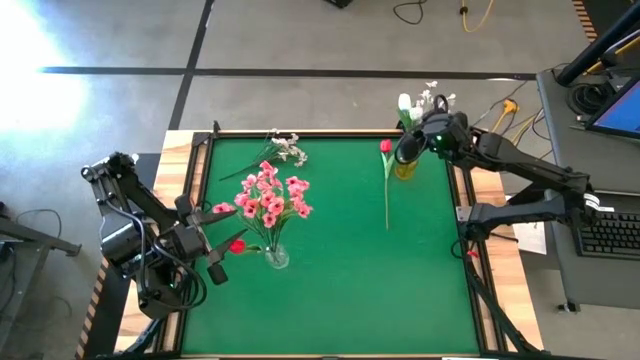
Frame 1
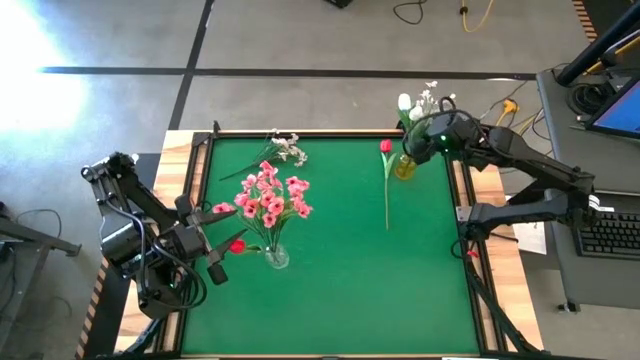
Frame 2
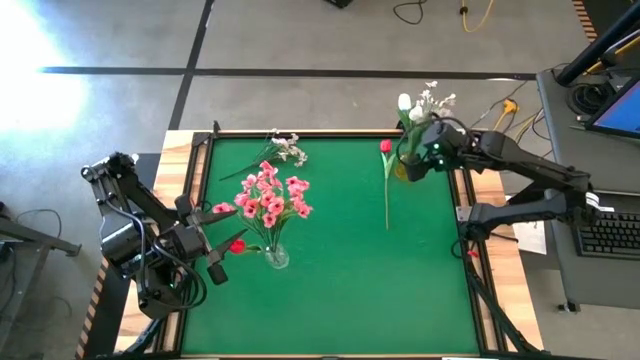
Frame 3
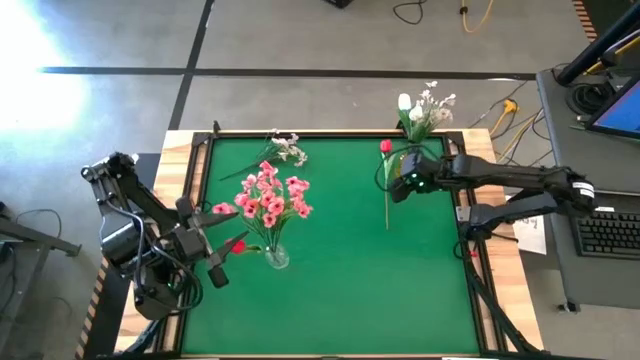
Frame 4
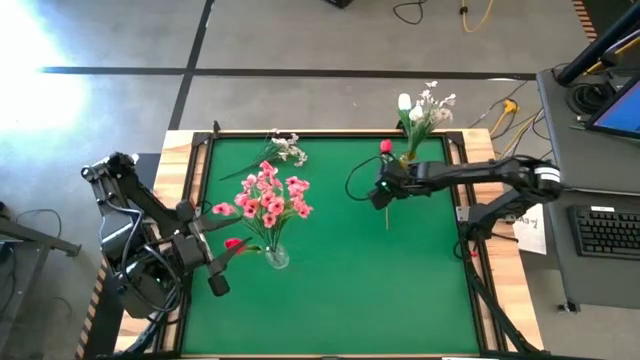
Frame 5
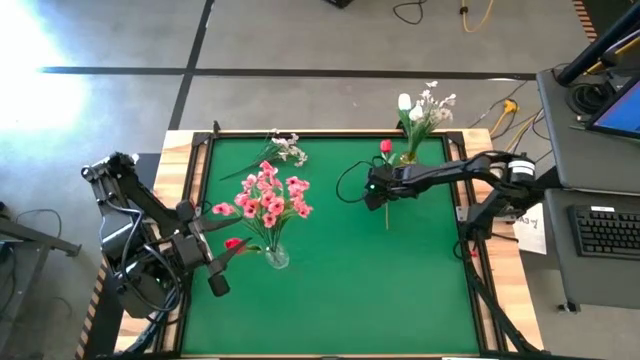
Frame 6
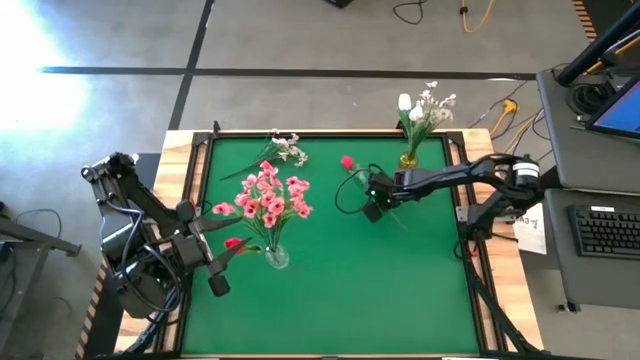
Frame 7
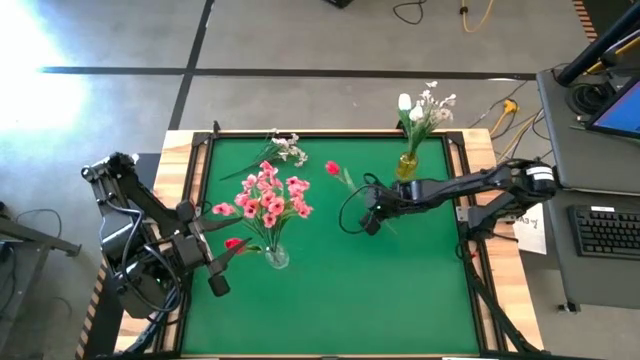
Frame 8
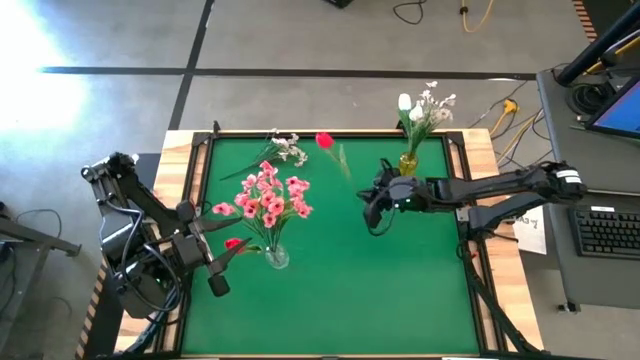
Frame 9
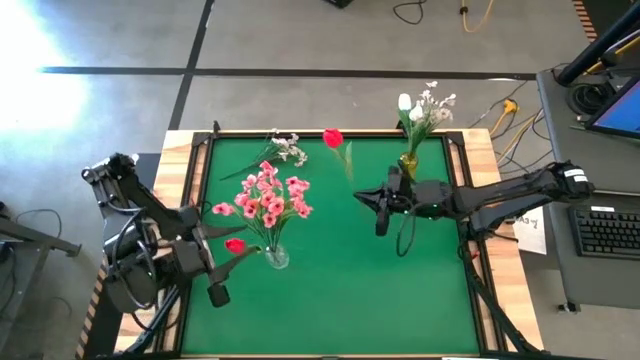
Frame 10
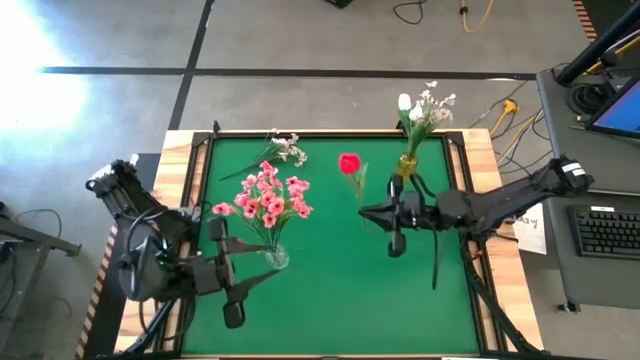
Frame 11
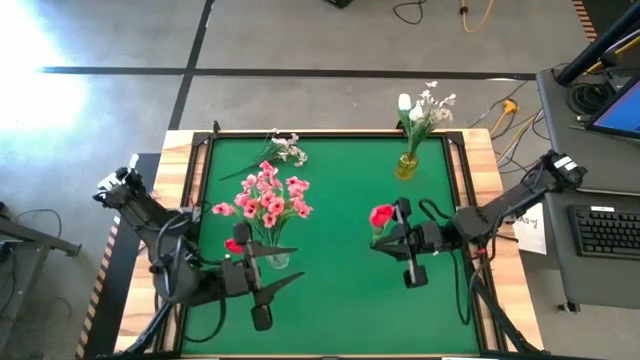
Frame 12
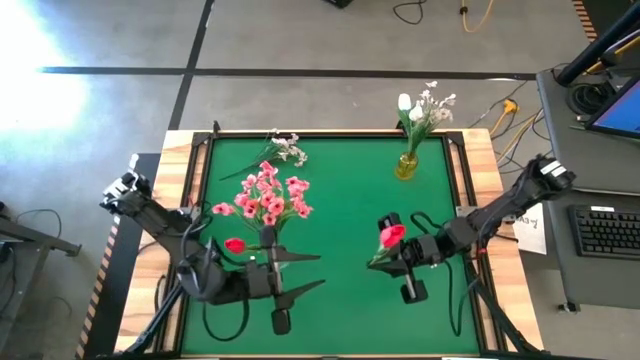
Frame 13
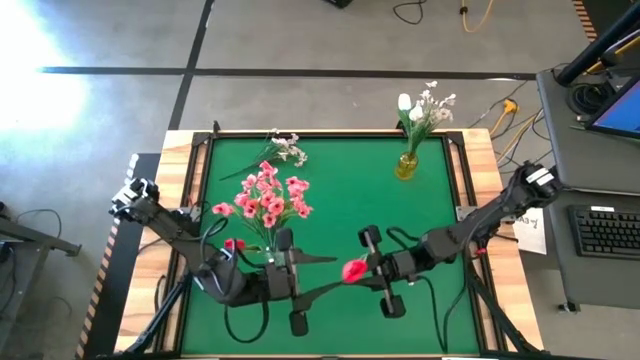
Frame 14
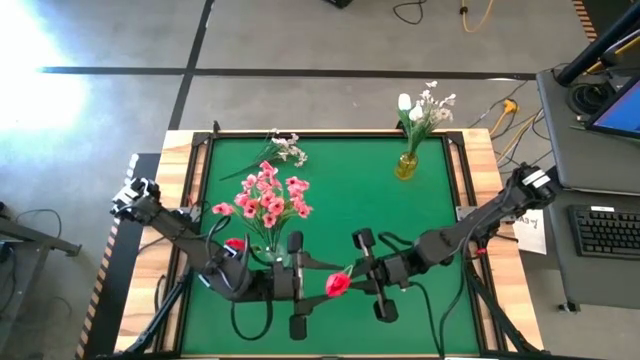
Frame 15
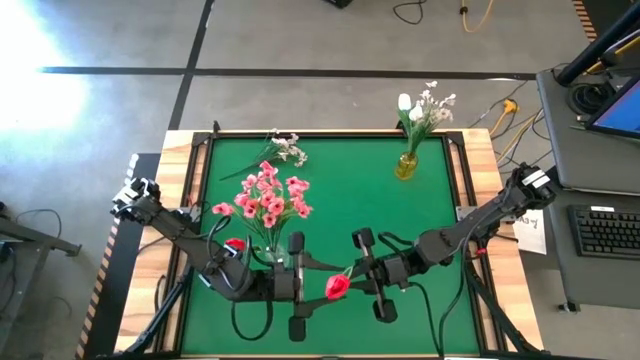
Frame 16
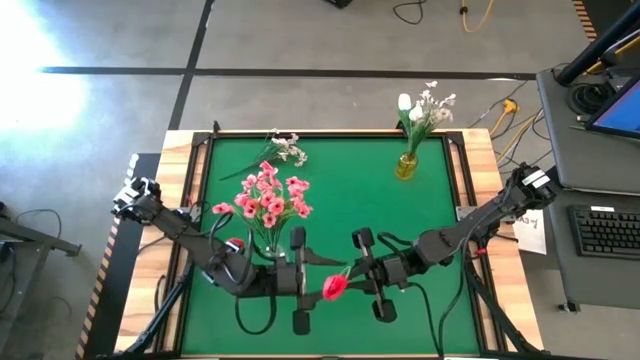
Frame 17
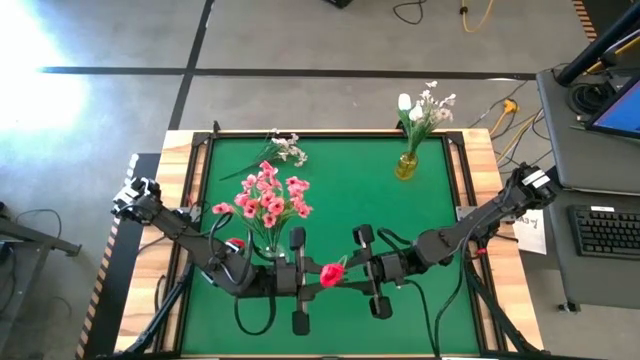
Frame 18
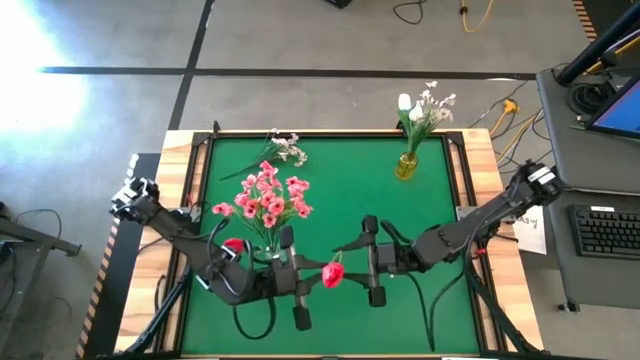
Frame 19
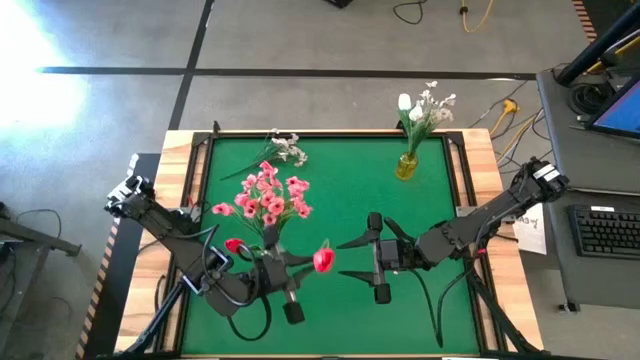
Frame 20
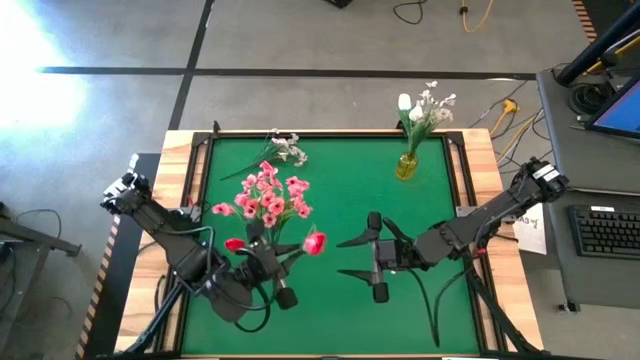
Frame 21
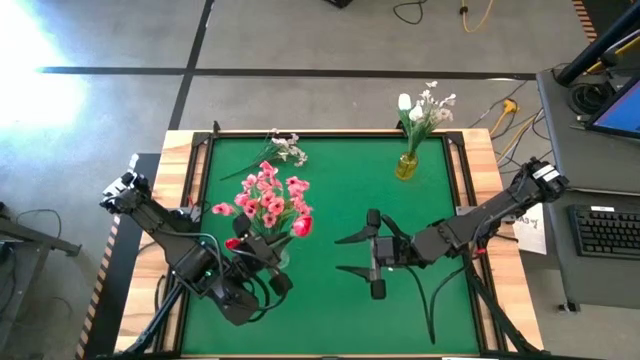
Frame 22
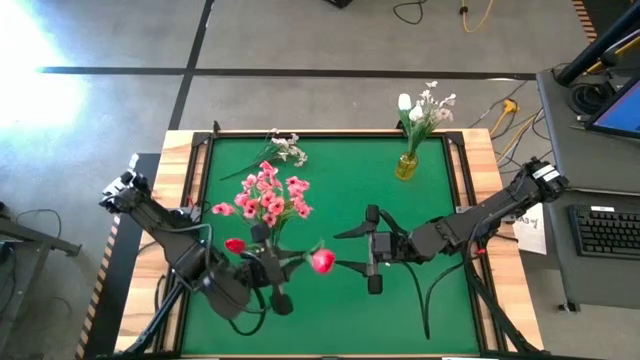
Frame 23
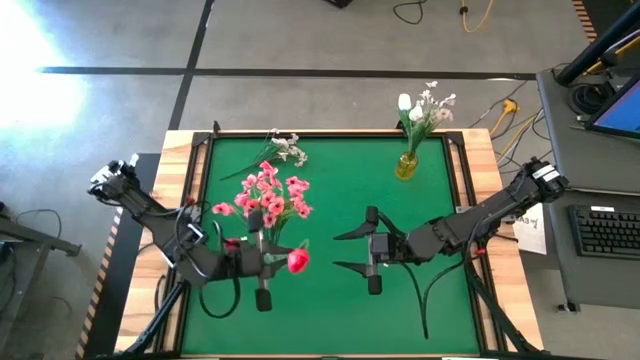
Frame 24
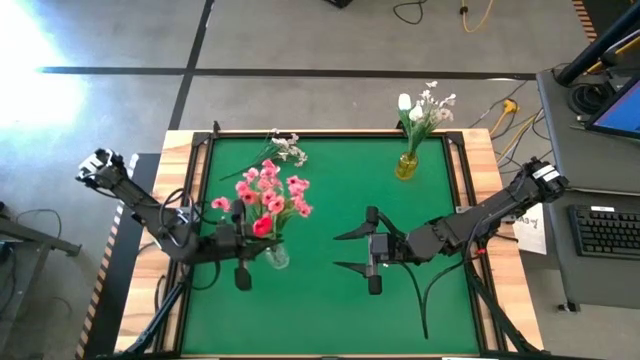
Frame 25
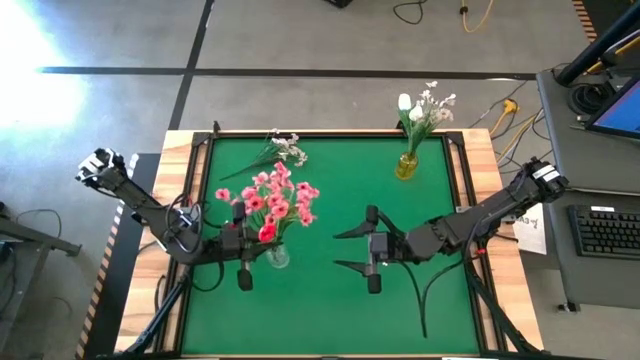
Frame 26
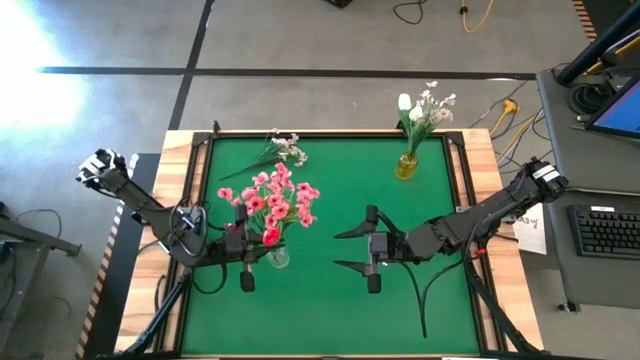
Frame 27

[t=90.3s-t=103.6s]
Task: Sort flowers into vase by color
Put the red flowers into the transparent vase

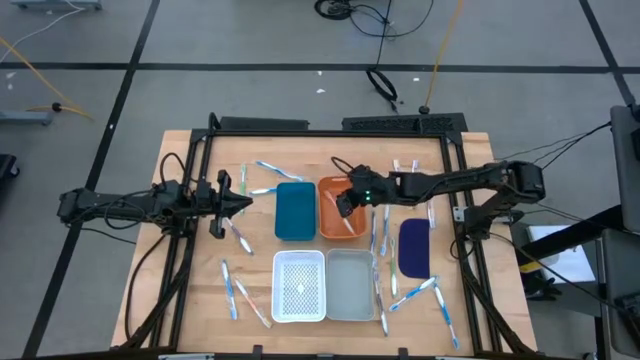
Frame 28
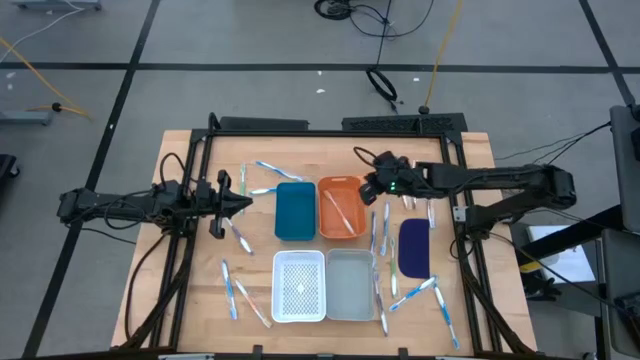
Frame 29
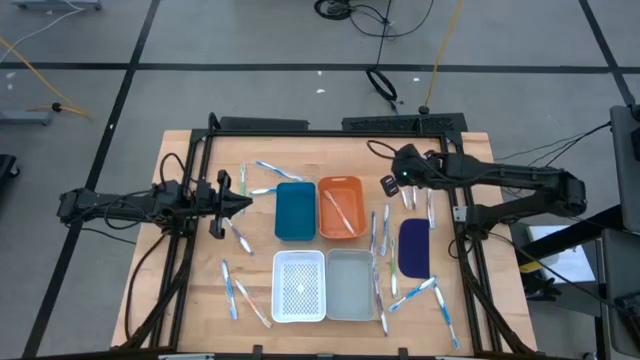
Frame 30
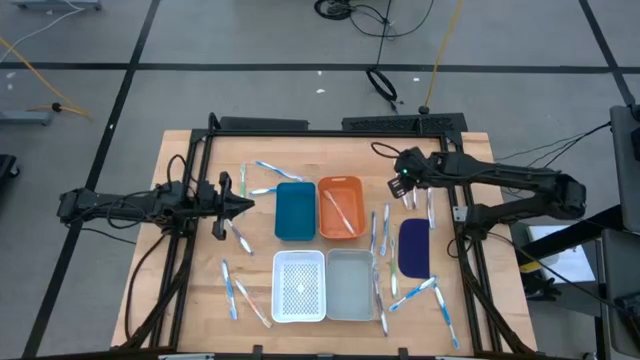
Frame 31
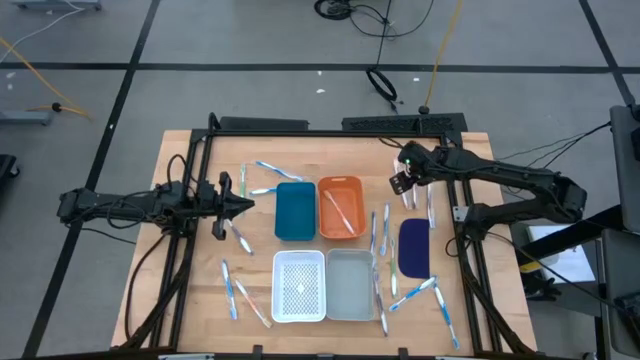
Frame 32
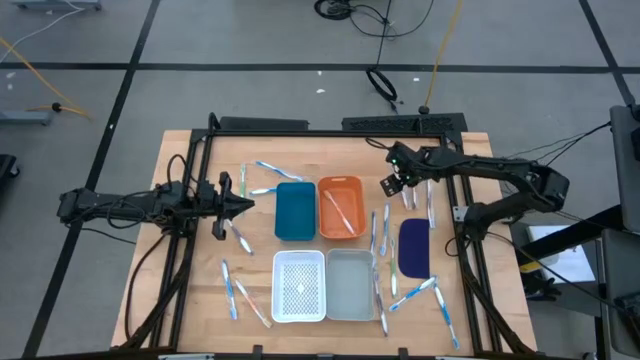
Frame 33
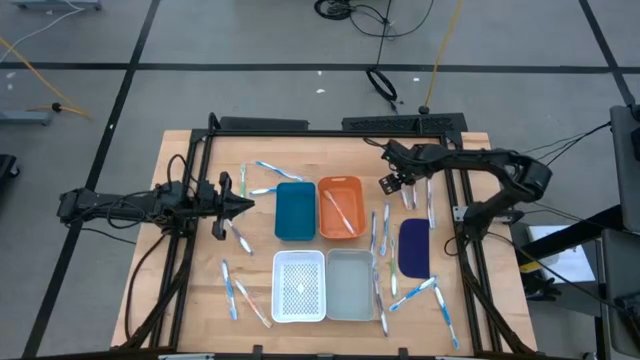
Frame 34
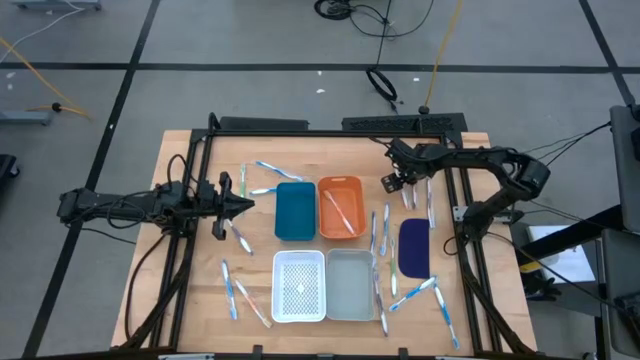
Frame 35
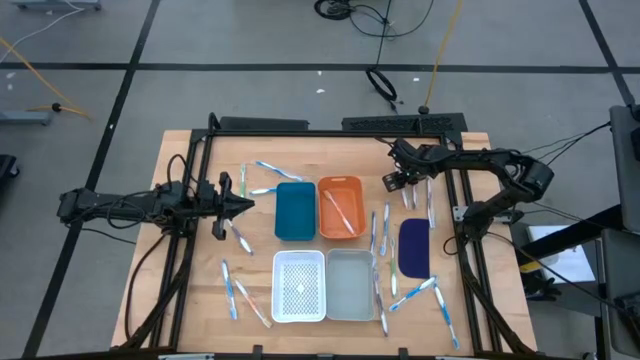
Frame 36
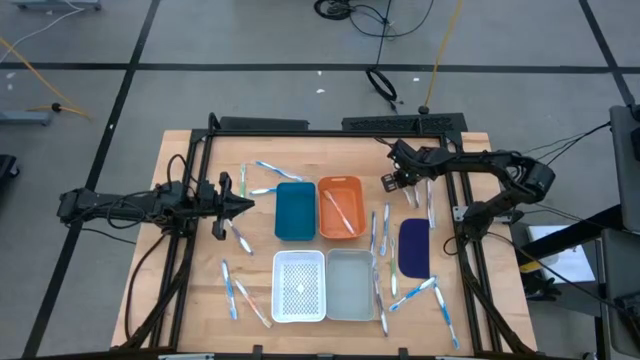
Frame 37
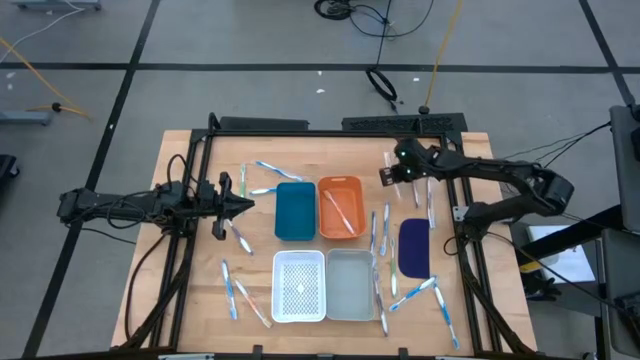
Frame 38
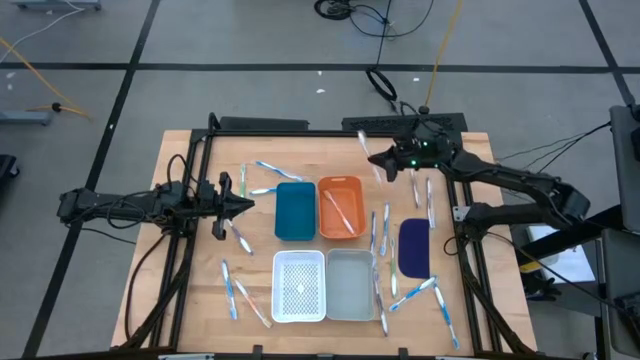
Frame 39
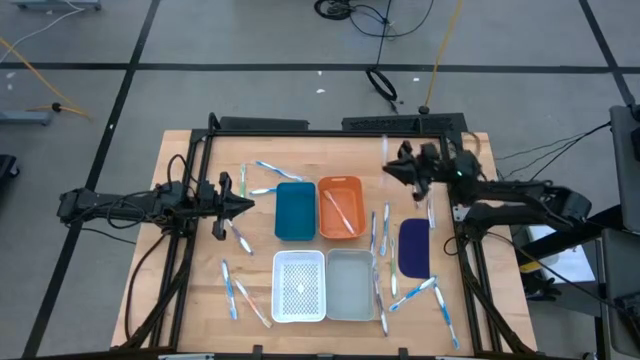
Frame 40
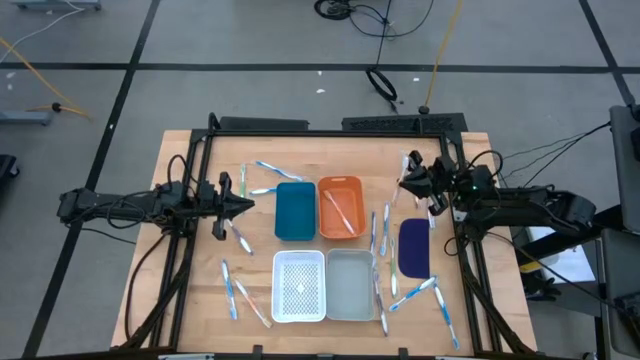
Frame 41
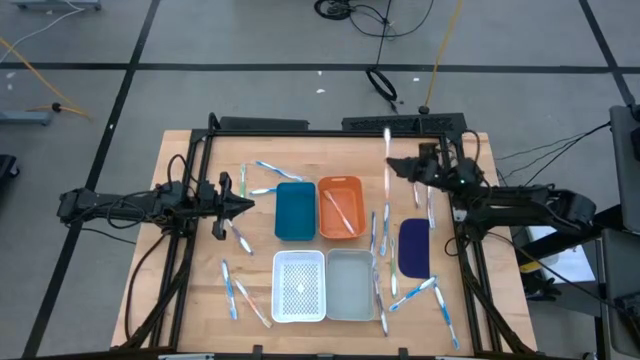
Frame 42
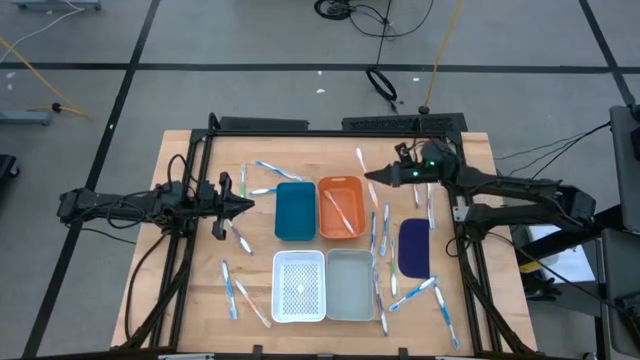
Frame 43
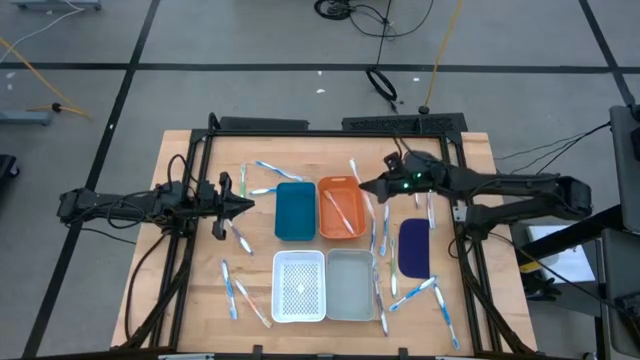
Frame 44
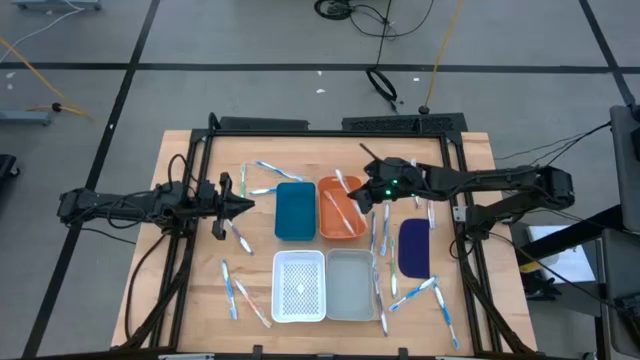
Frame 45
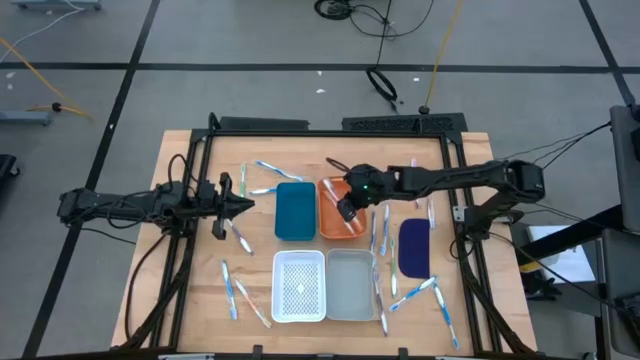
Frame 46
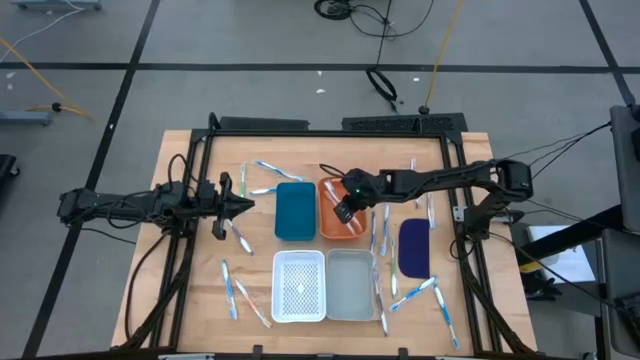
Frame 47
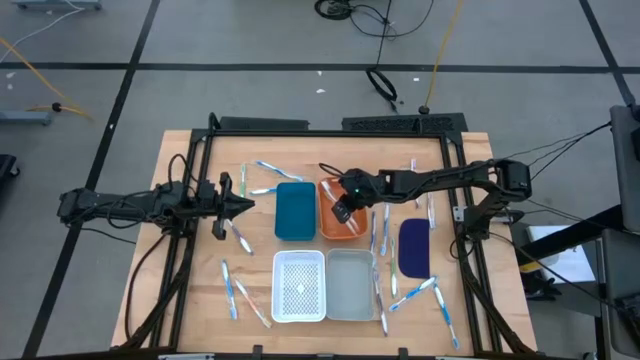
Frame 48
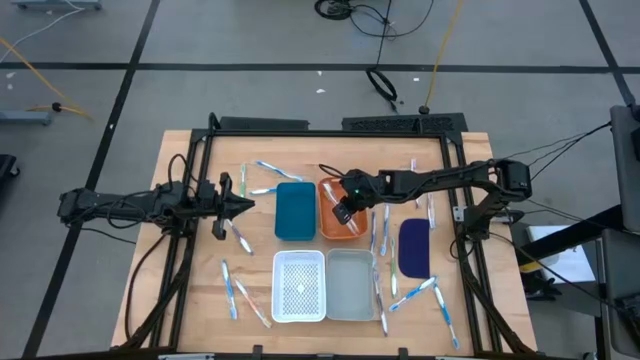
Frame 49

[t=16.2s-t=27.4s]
Task: Pick & Place Toothbrushes
Put the orange toothbrush into the orange bin
